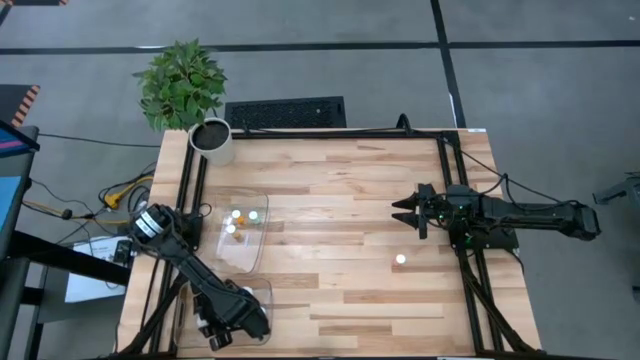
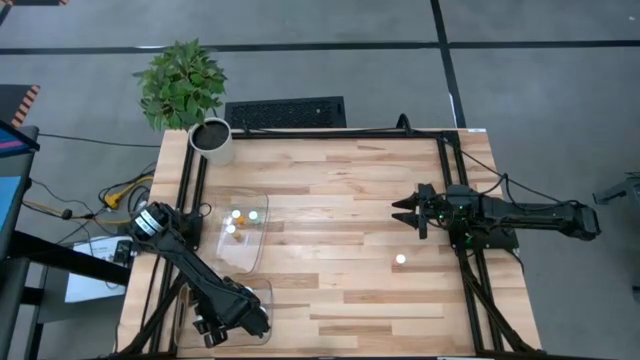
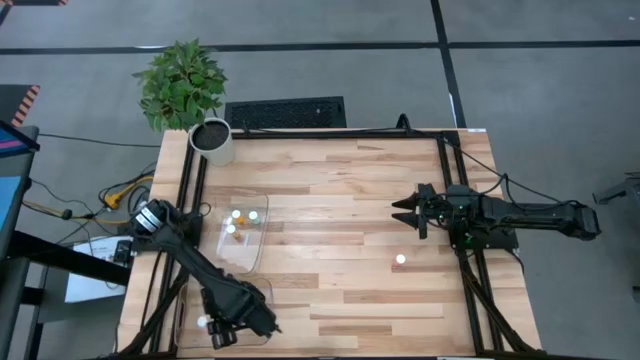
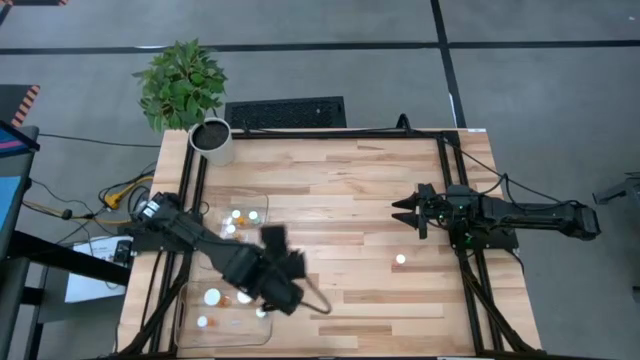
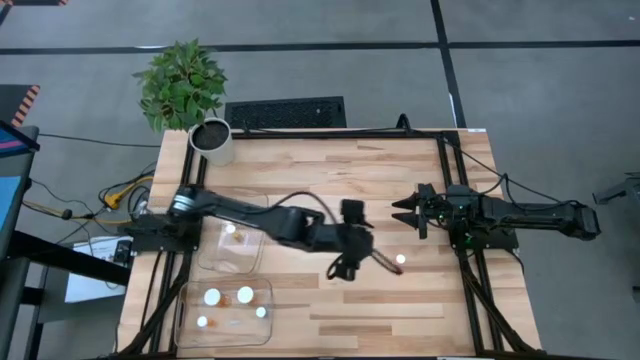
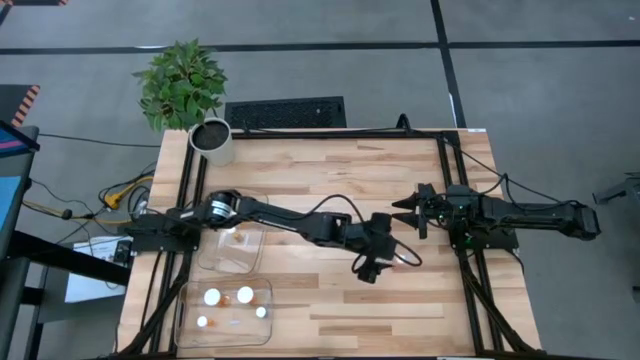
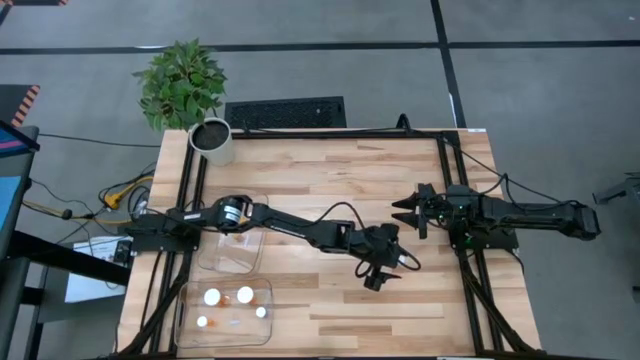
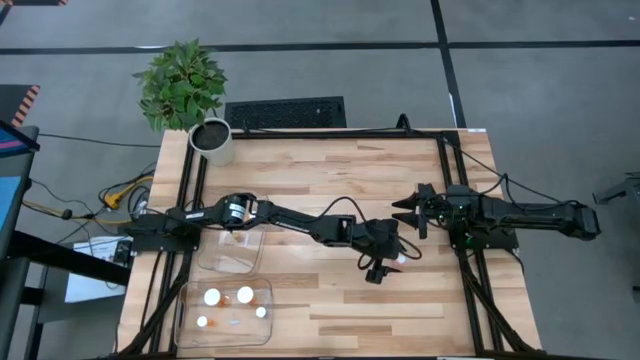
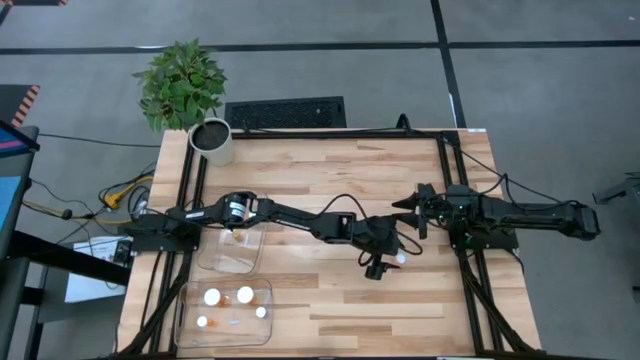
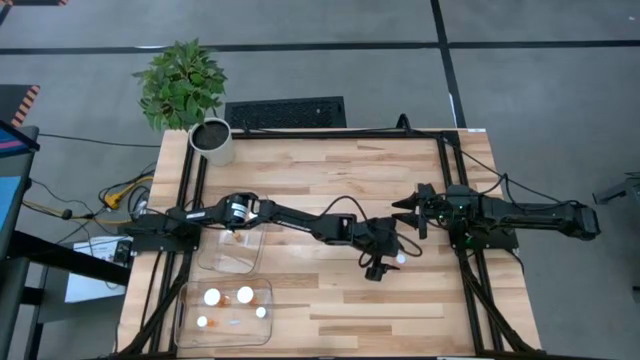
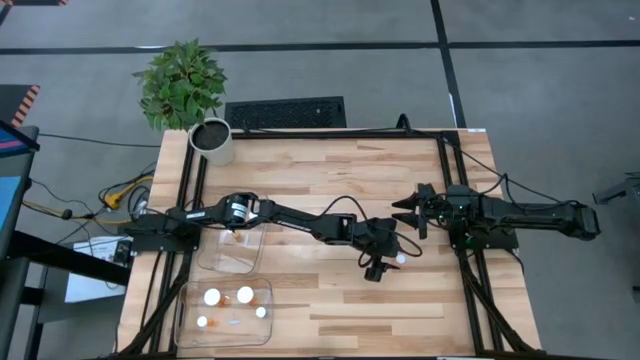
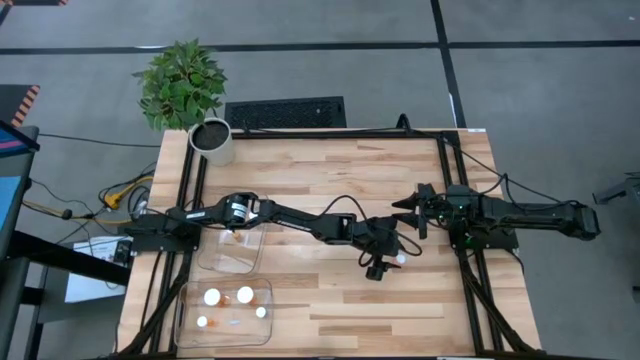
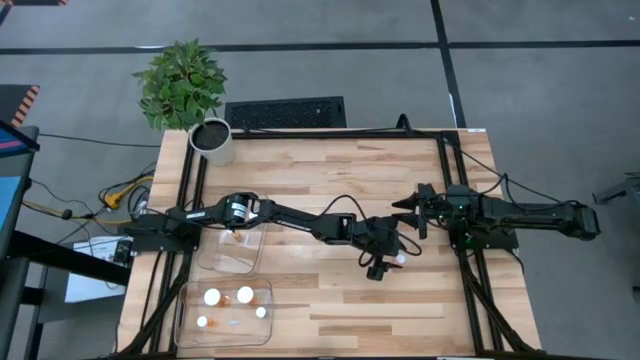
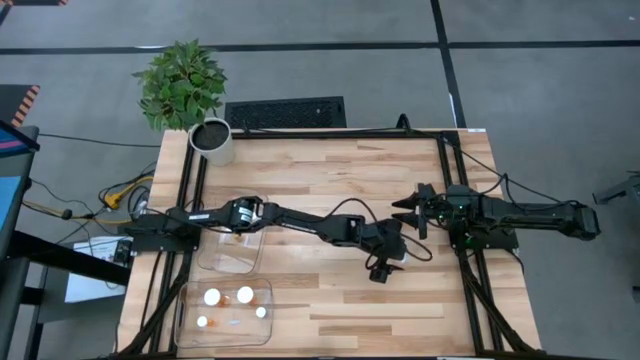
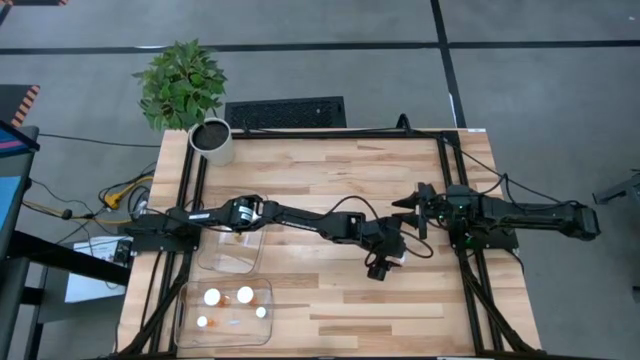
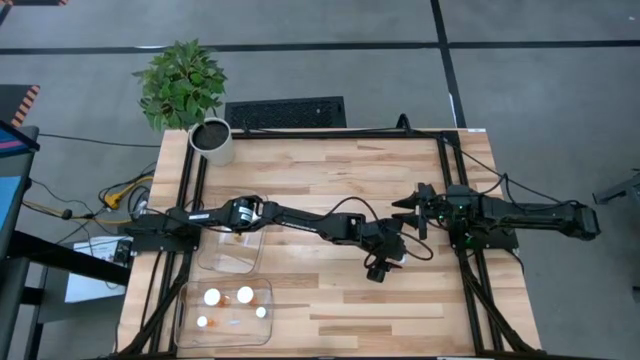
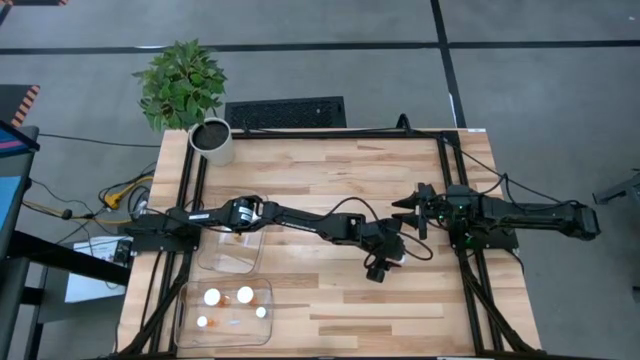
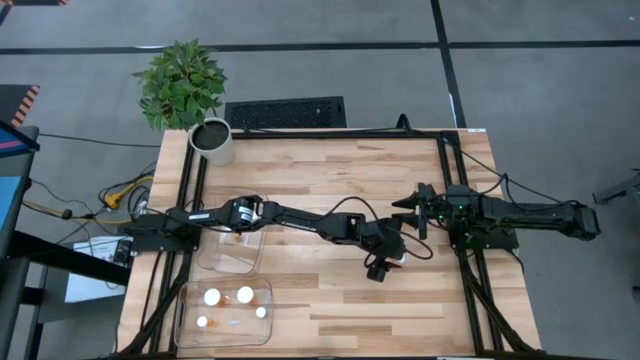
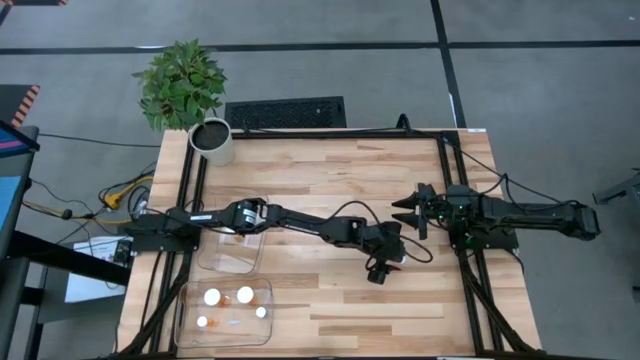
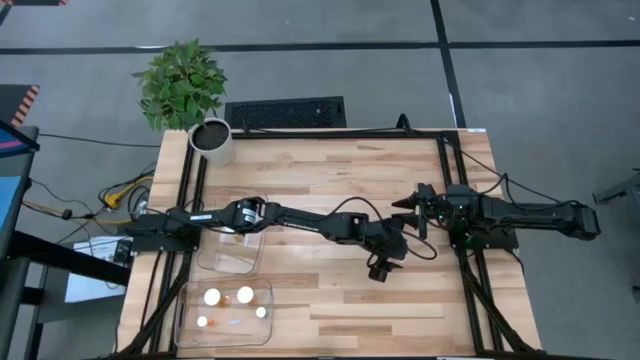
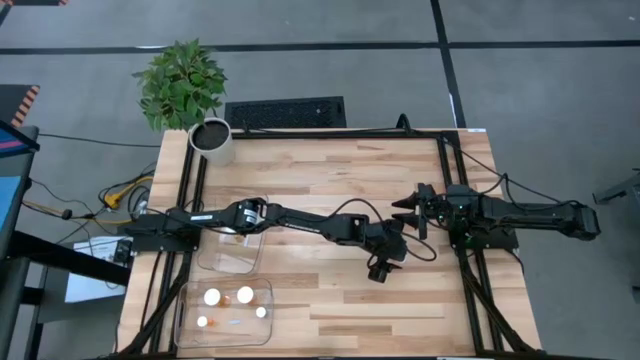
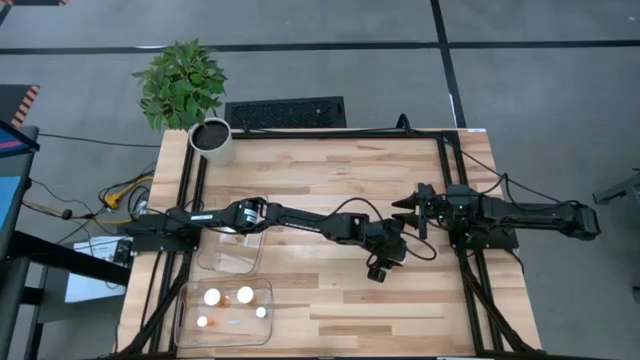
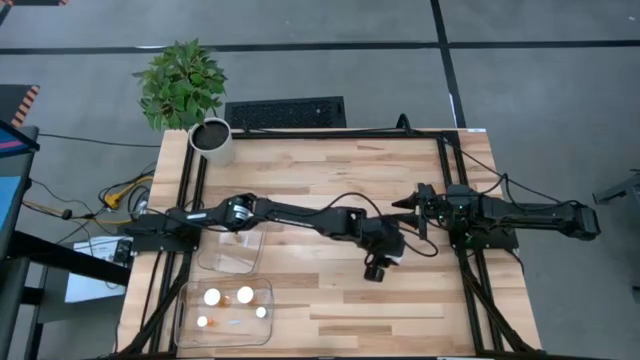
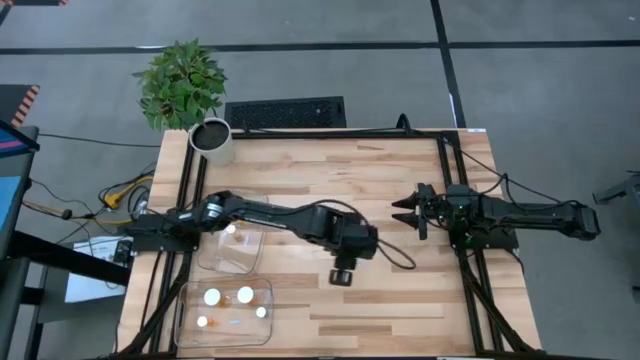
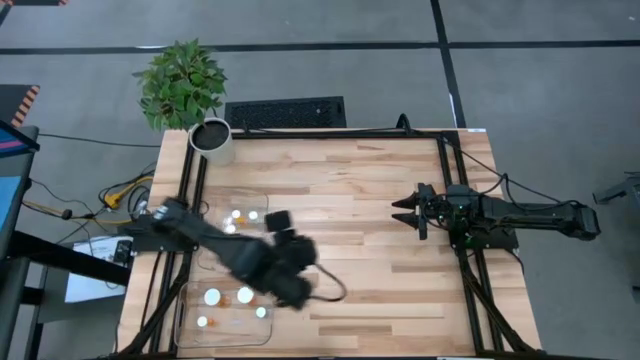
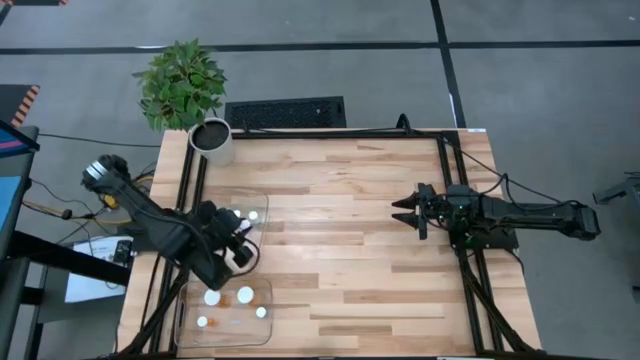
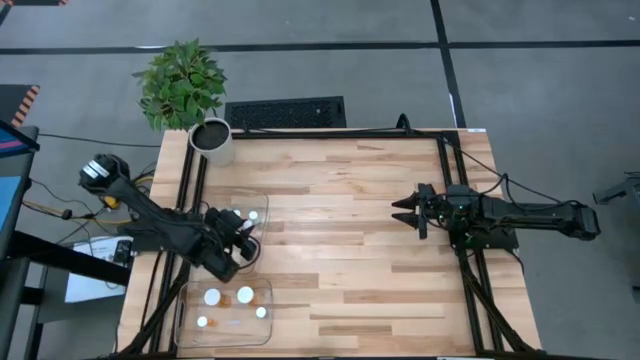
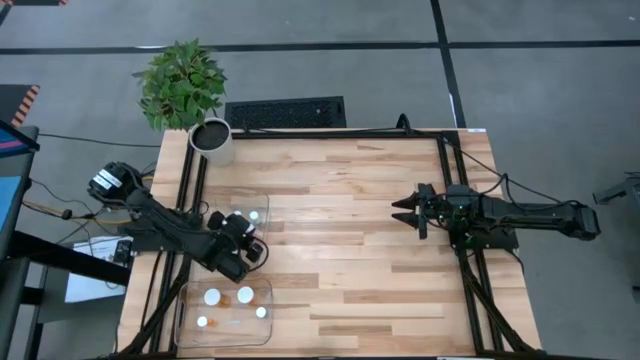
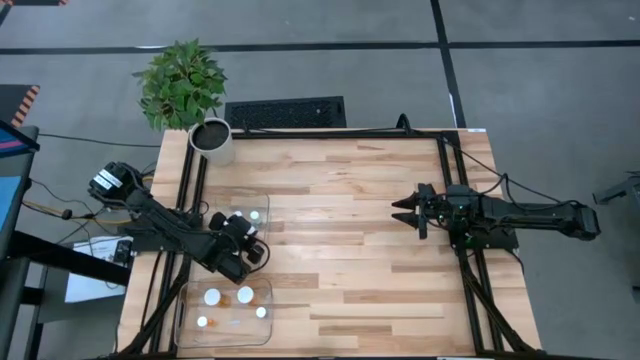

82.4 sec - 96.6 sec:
Task: Pick and place medicine bottles into bin by pill shape (circle, oval)
Put the pink capsule bottle into the top transparent bin

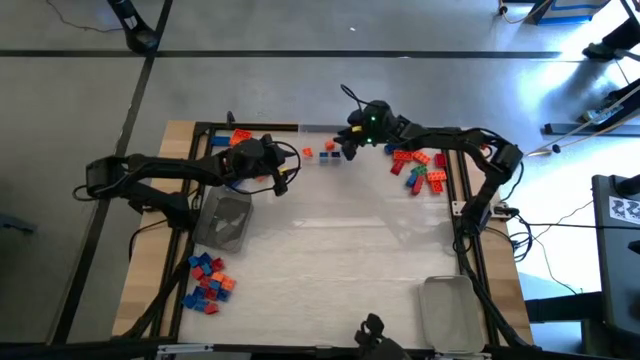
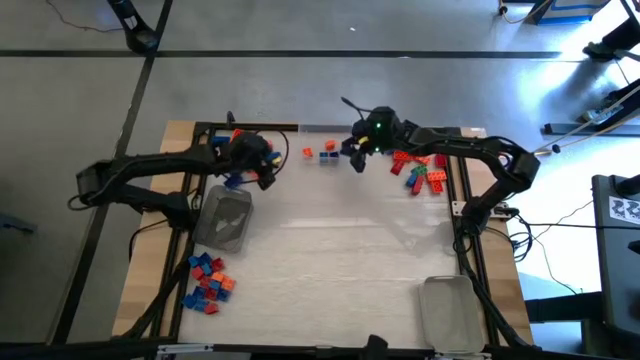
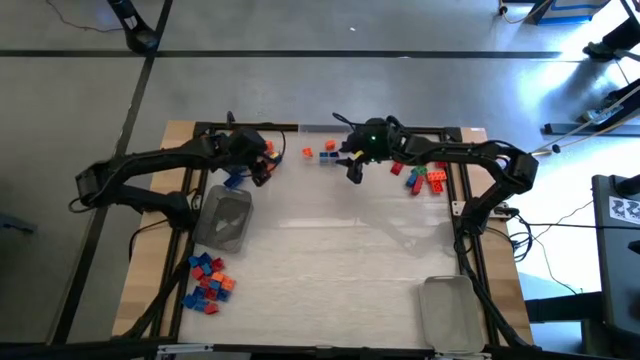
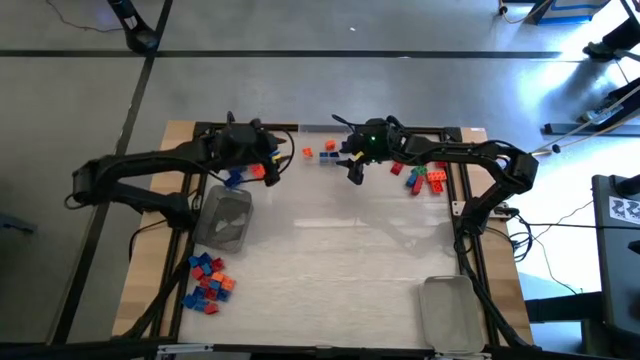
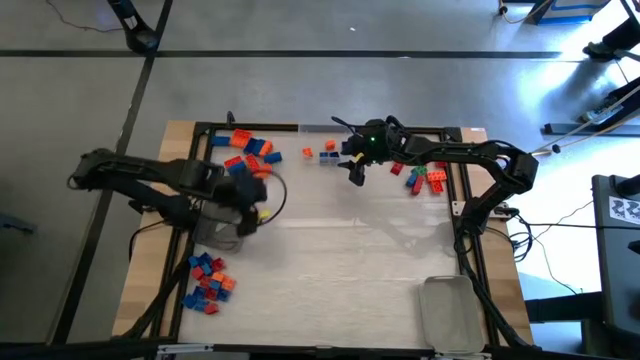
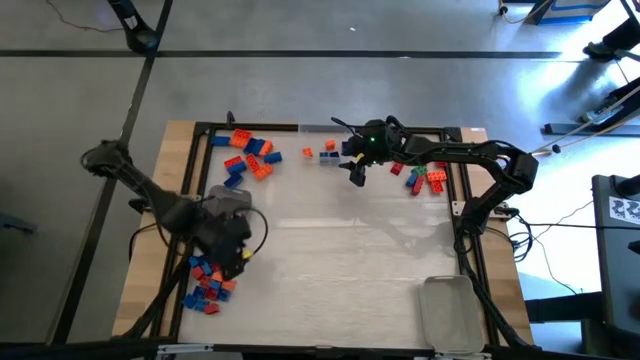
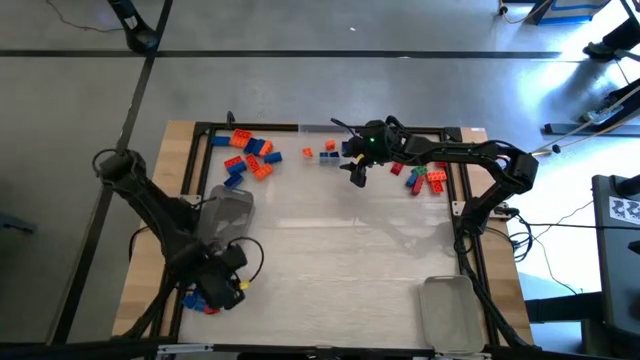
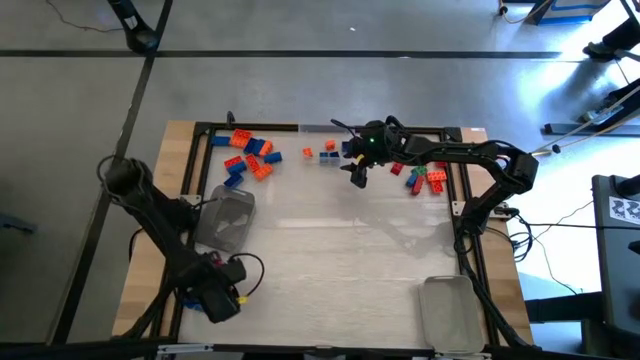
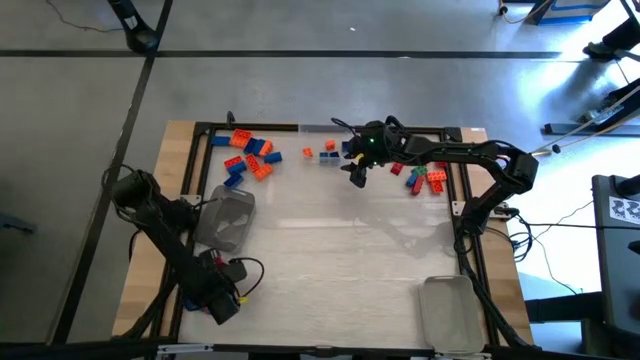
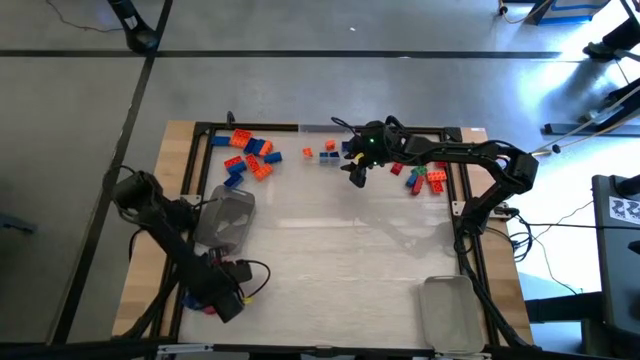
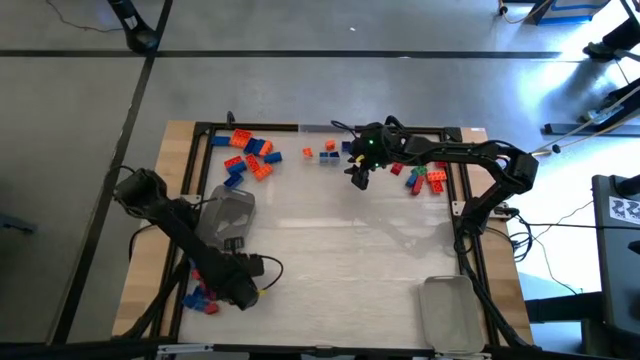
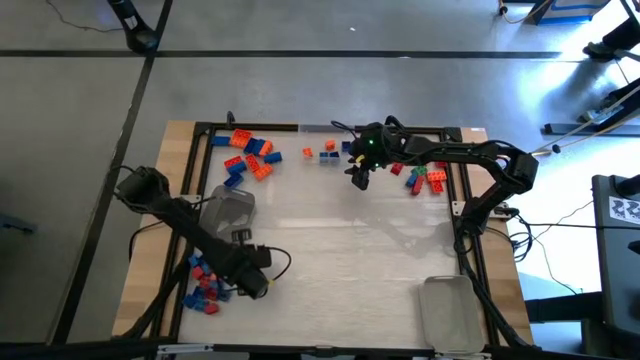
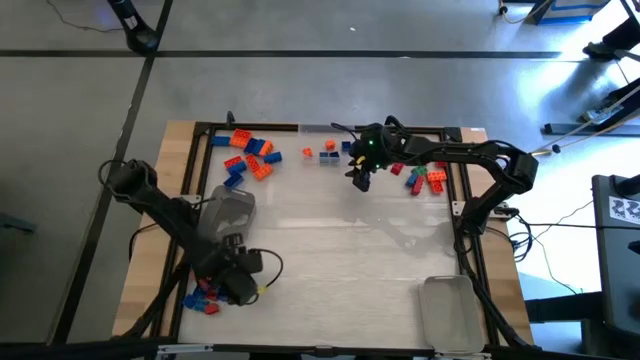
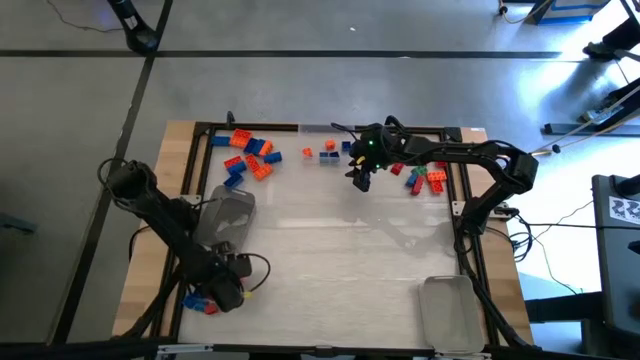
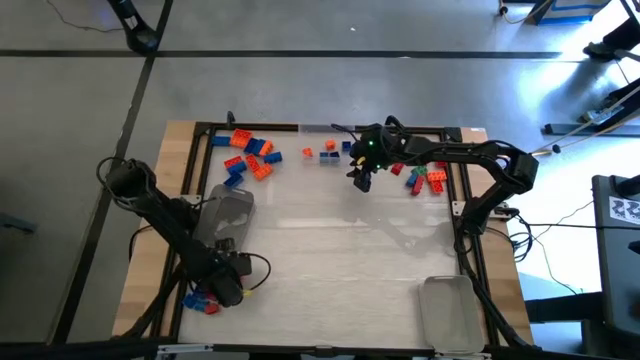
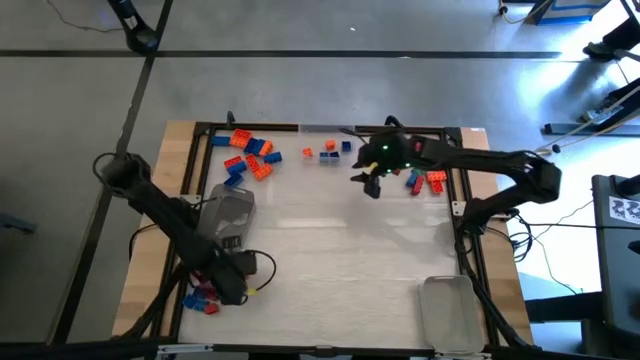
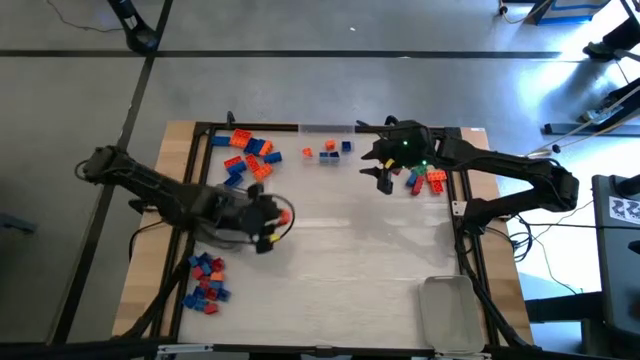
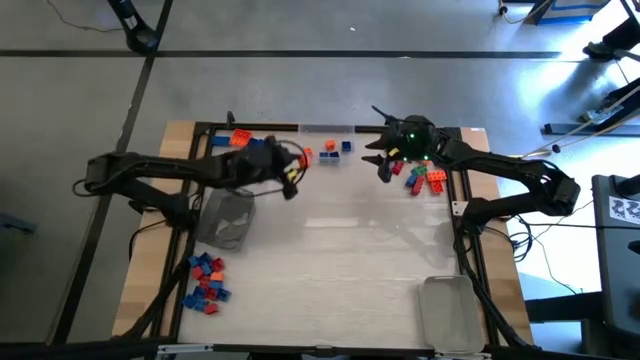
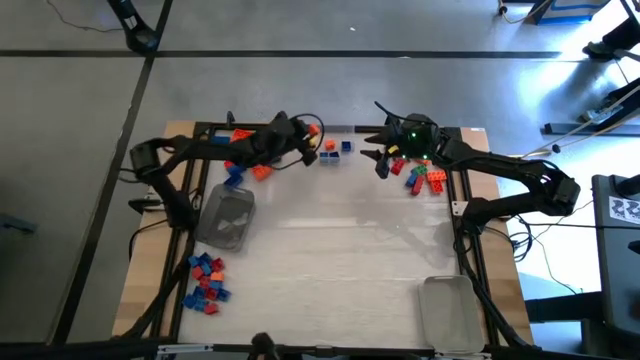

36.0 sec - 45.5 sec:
Task: Sort blocks by size
Put the orange 4 game piece into the transparent bin
